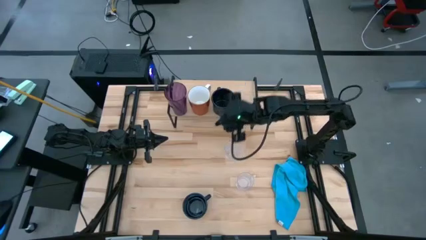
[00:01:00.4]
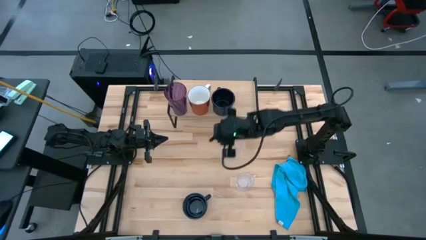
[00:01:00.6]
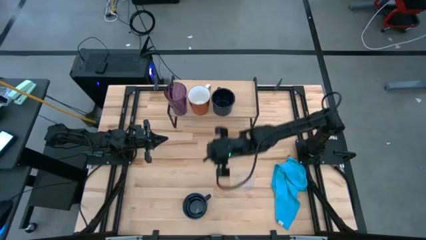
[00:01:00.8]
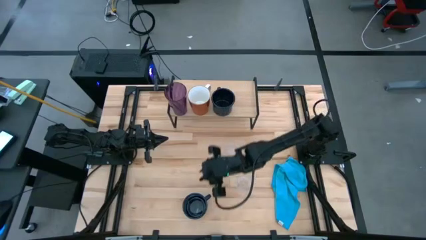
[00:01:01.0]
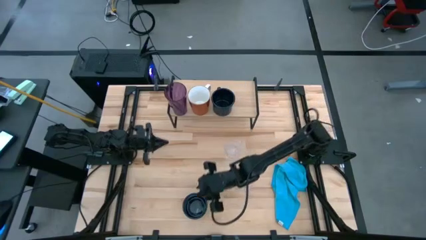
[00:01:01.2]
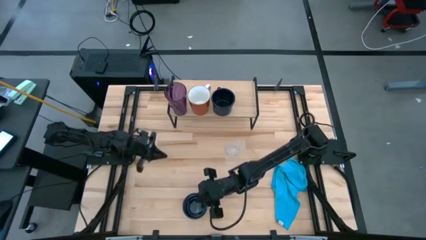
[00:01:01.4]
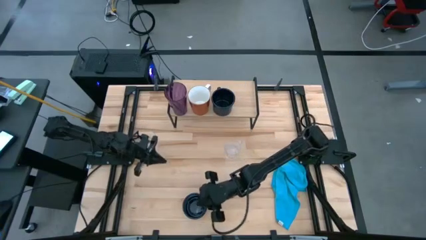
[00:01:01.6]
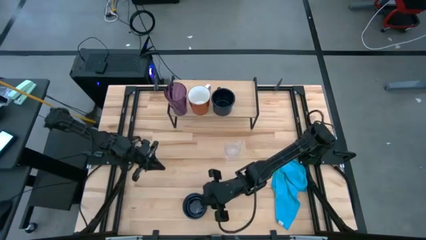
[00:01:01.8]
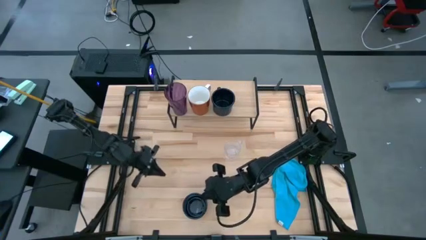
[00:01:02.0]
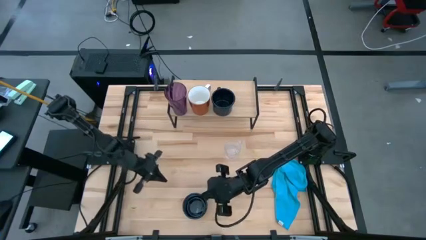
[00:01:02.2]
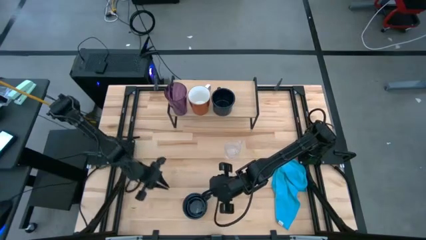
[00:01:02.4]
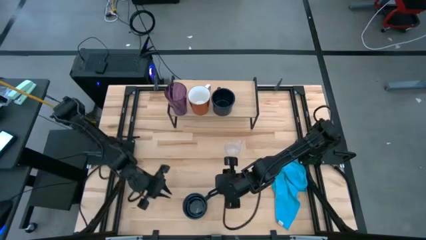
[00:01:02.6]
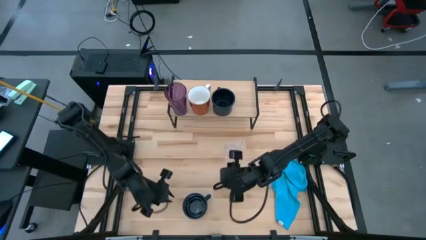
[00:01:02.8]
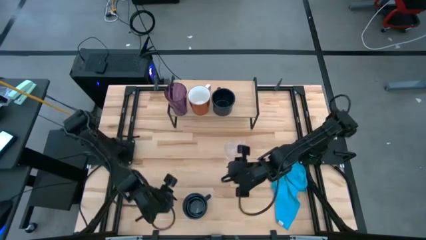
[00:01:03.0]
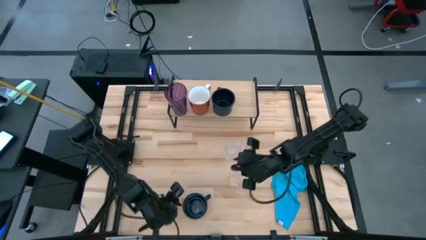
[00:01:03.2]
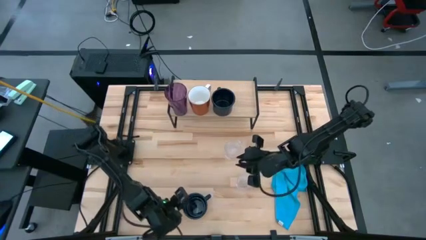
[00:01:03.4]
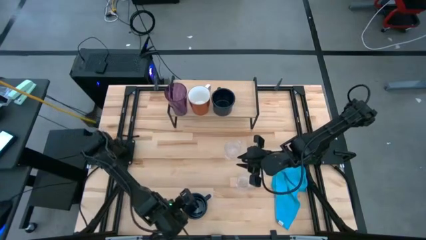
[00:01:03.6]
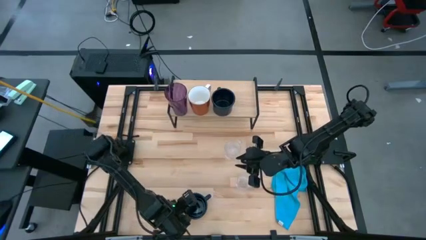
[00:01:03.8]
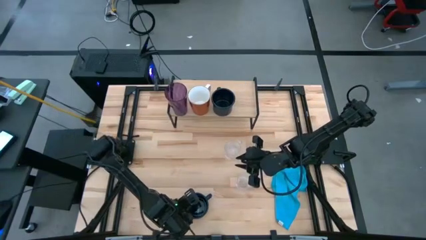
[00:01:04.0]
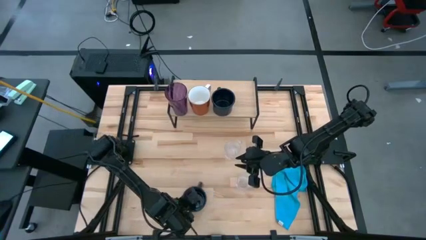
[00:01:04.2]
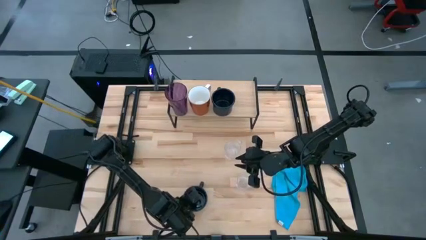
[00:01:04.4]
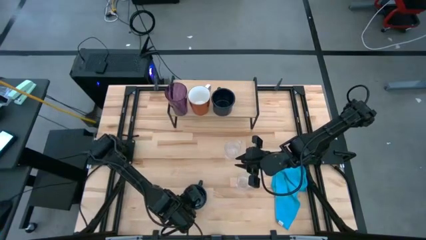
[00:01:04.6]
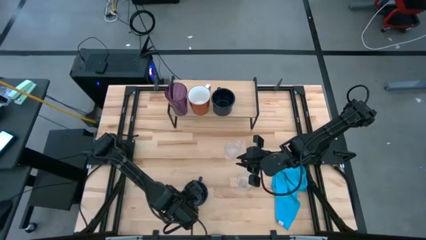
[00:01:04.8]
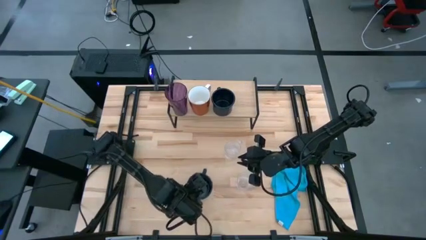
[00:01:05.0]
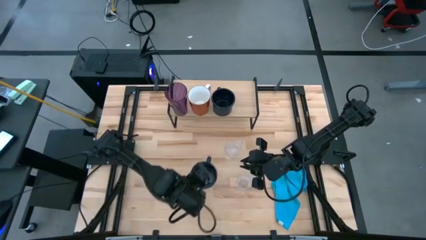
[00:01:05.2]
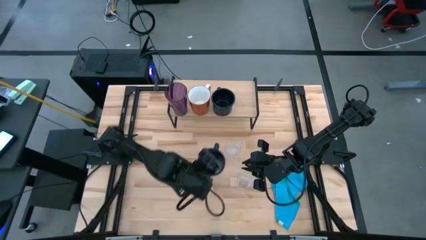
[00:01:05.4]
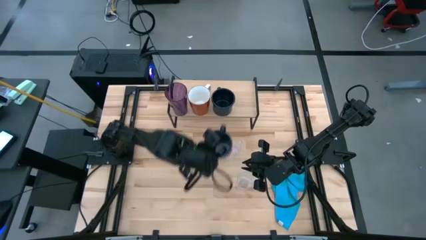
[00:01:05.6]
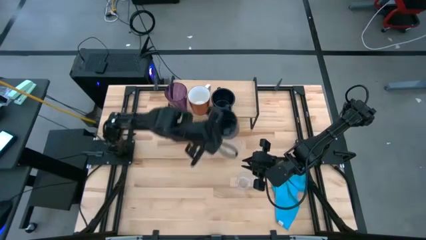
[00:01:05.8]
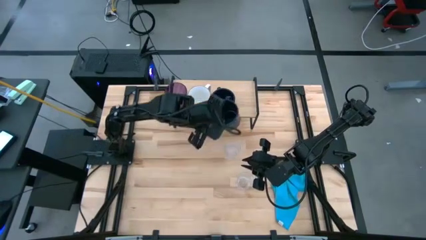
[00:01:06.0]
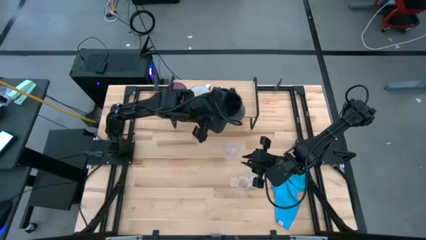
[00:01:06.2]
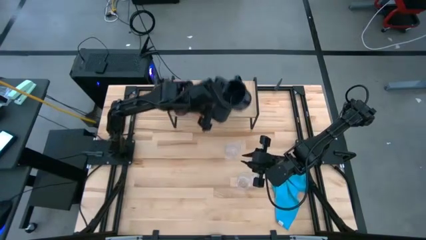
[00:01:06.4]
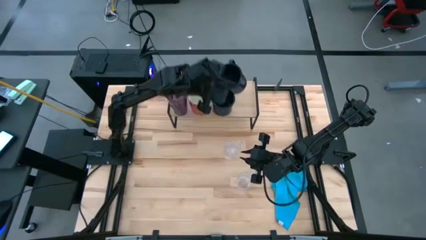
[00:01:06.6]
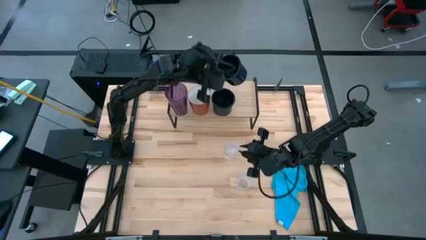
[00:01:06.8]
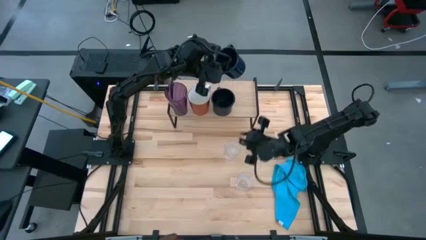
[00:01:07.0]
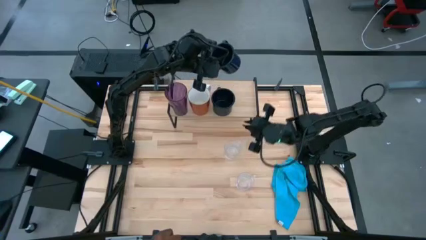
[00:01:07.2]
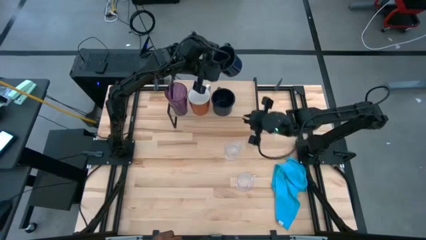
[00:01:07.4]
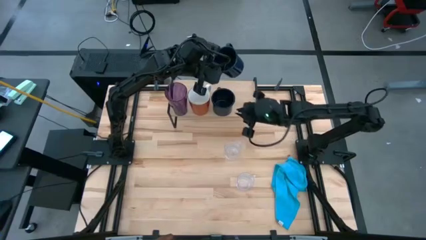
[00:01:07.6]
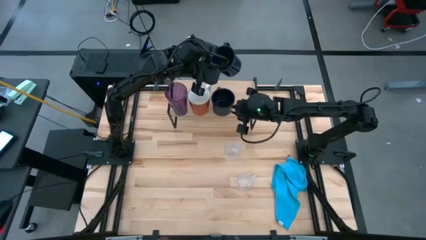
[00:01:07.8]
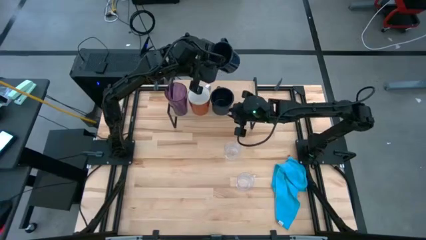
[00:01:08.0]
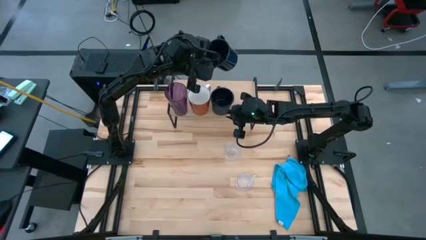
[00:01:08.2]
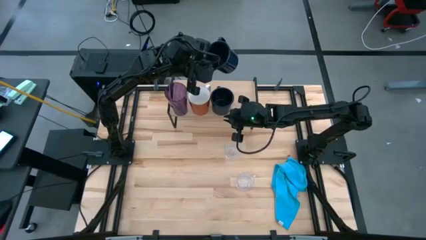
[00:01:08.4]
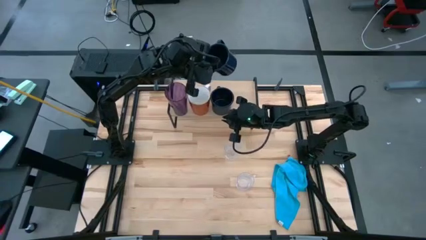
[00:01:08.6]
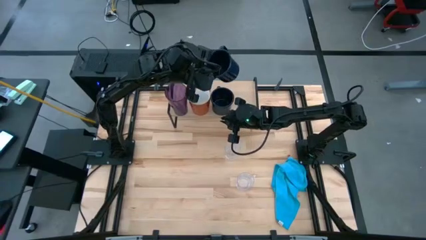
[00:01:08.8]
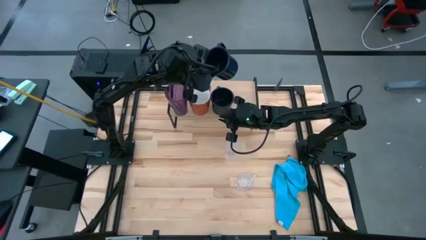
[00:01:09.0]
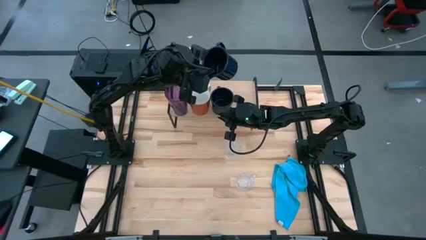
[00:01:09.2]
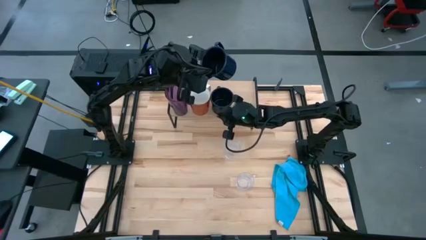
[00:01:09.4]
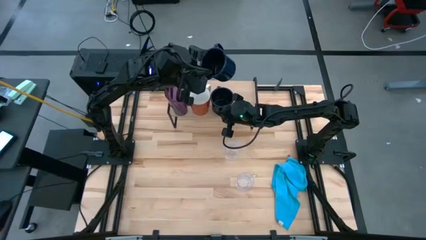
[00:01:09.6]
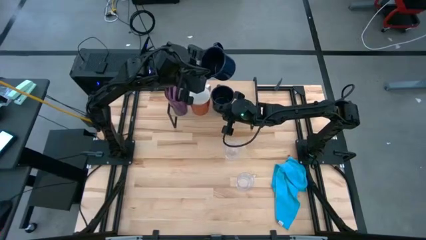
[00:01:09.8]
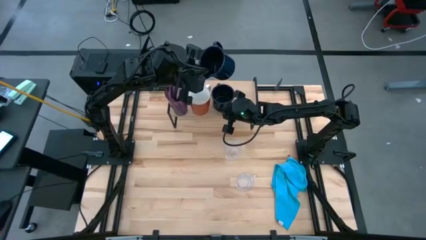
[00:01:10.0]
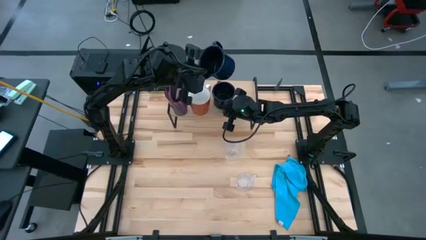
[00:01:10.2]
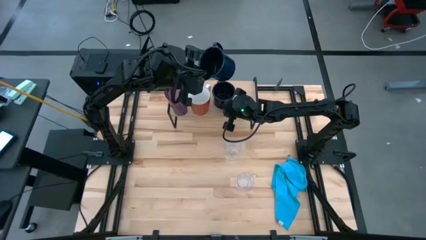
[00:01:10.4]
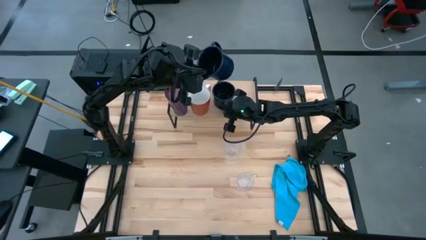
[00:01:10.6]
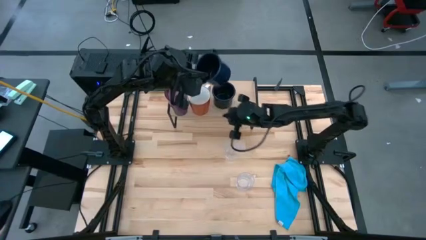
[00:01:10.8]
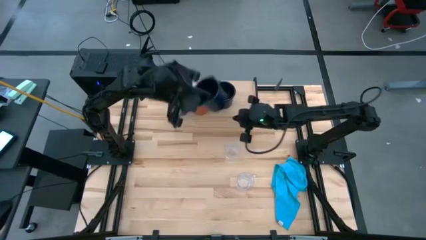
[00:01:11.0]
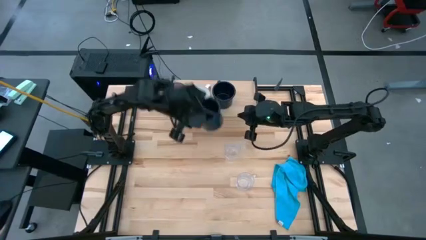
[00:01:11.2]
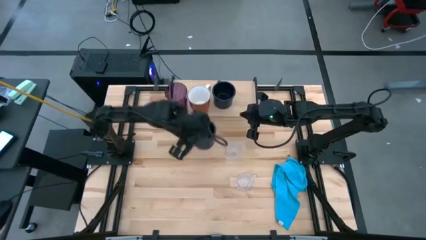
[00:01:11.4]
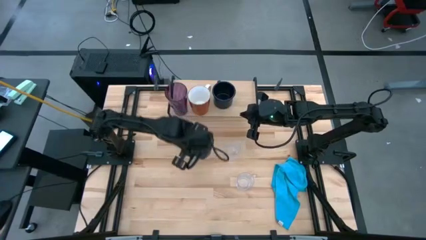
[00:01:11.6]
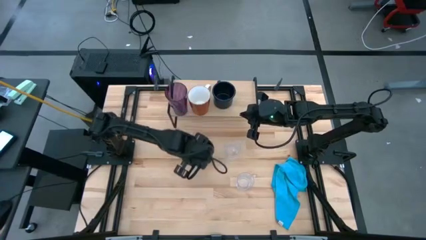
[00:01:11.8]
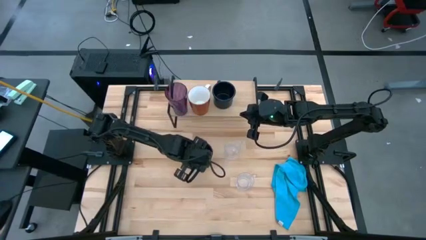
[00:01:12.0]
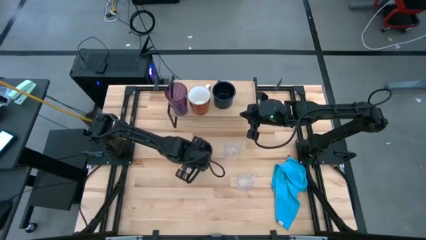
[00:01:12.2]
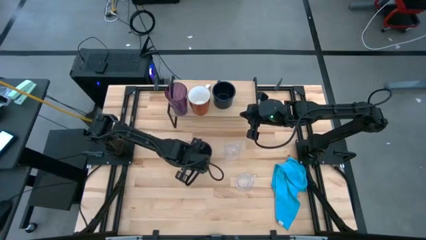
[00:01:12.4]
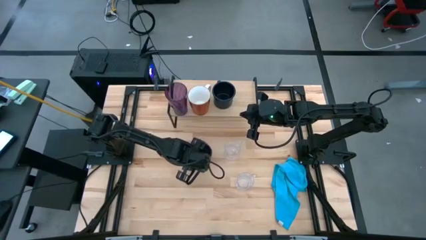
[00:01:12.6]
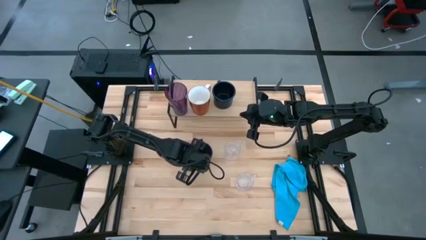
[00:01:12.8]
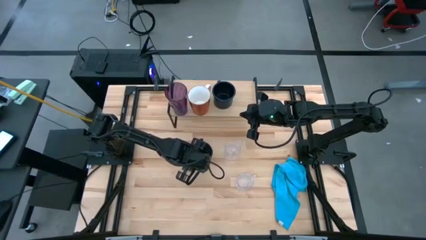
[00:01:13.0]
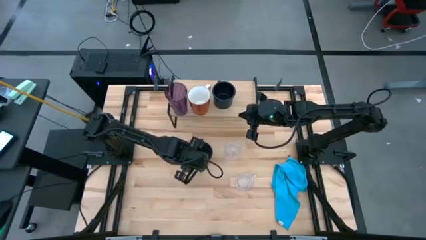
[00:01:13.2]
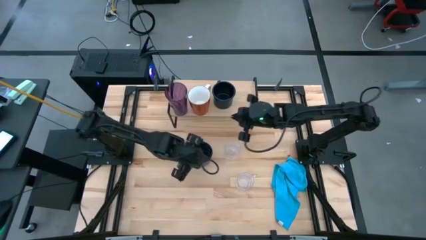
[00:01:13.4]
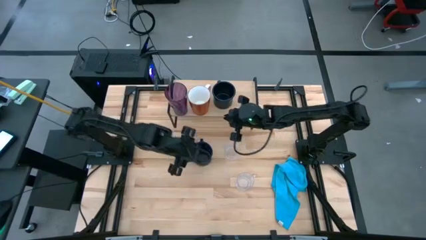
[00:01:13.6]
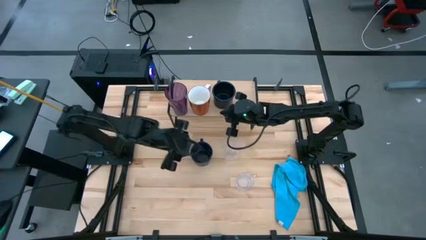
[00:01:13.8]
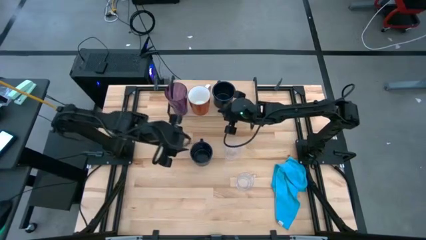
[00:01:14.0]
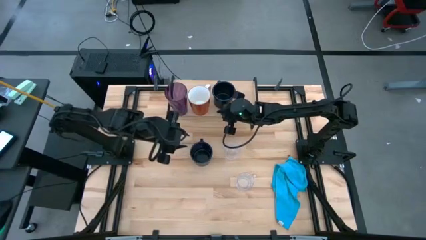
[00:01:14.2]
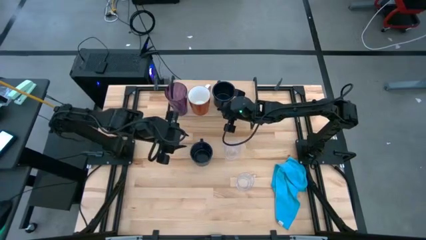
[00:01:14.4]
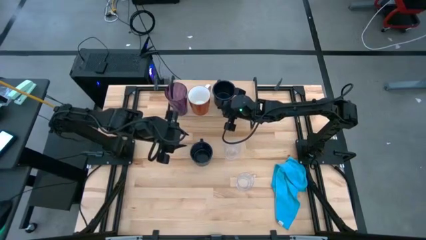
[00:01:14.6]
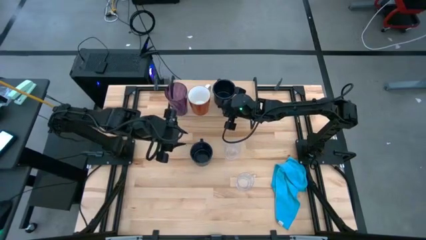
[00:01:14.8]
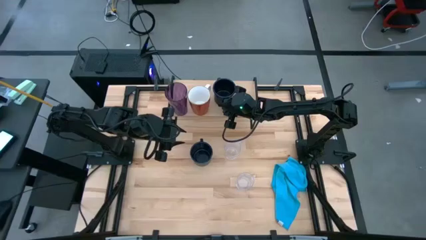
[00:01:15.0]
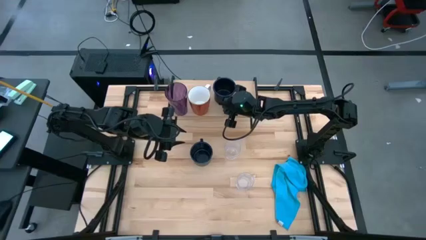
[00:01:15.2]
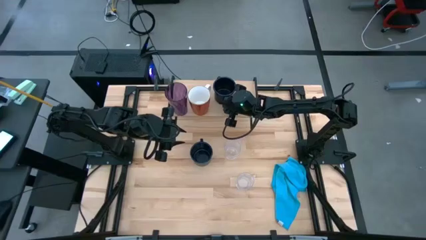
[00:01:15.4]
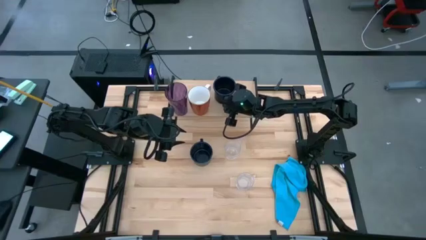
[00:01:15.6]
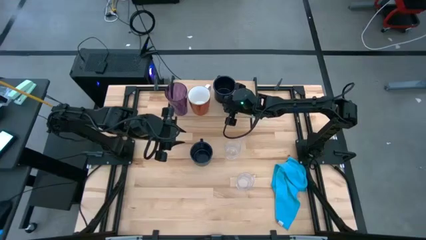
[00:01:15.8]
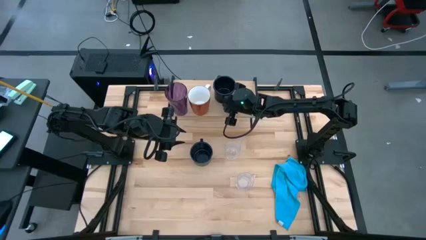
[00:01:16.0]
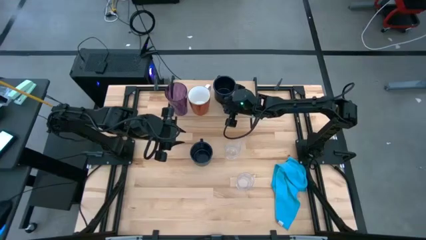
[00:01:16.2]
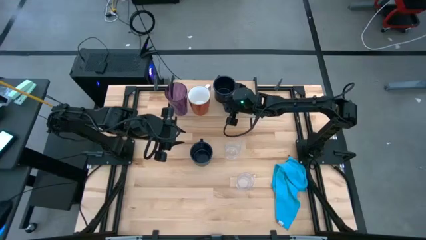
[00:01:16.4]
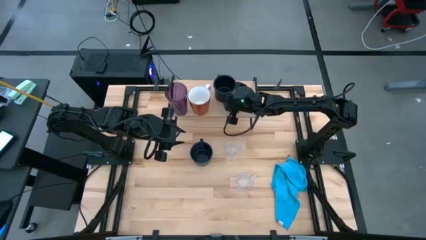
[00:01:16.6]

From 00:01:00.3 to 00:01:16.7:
Task: Stack small to large cups/mugs on shelf
Put the black mug on the shelf aligned with the other black mug
